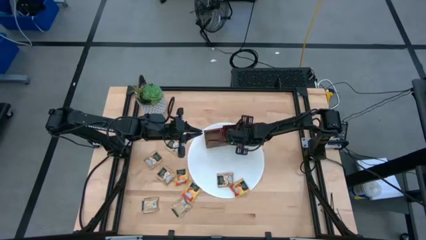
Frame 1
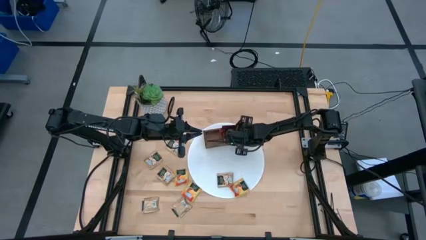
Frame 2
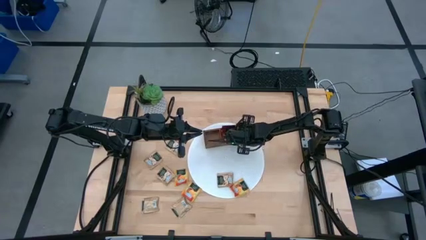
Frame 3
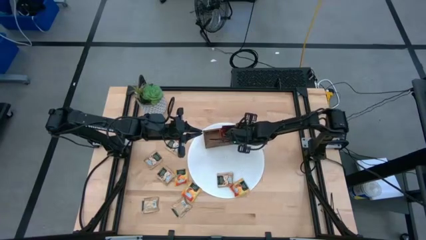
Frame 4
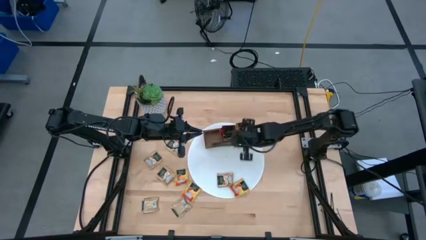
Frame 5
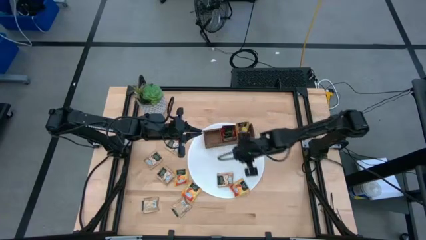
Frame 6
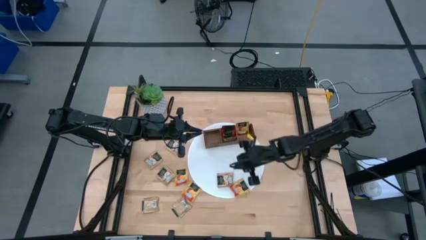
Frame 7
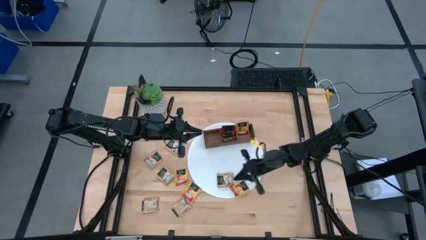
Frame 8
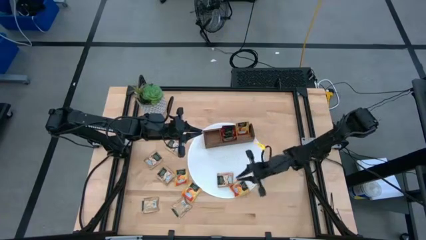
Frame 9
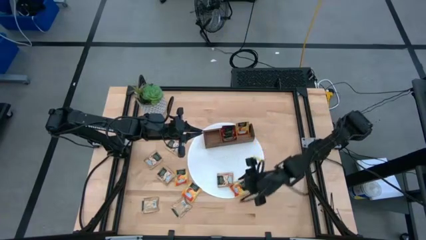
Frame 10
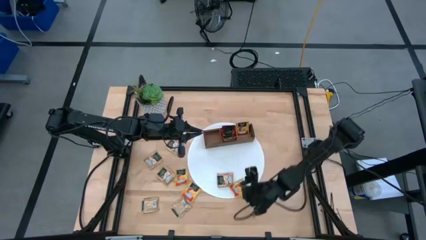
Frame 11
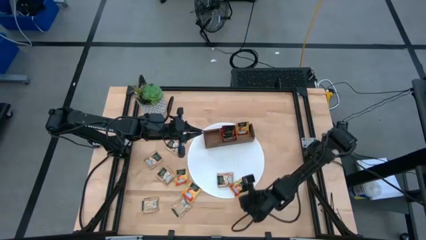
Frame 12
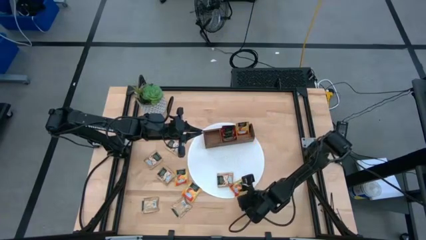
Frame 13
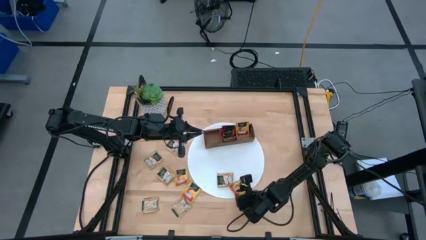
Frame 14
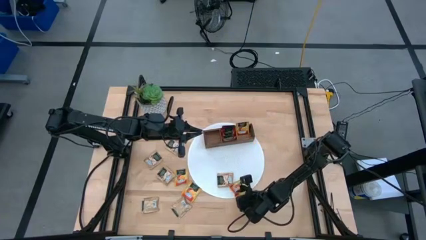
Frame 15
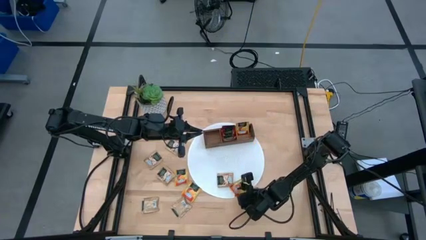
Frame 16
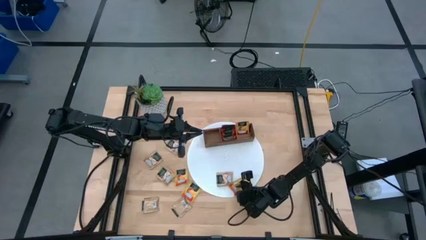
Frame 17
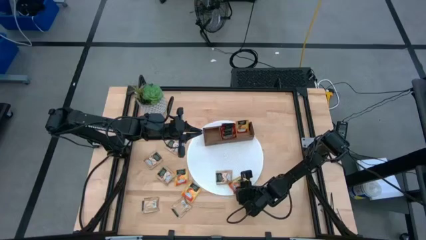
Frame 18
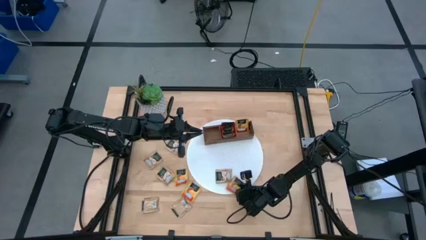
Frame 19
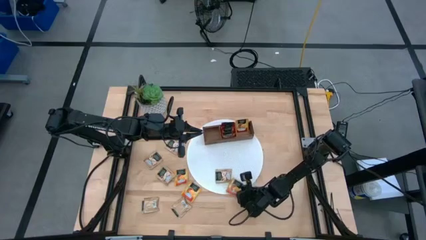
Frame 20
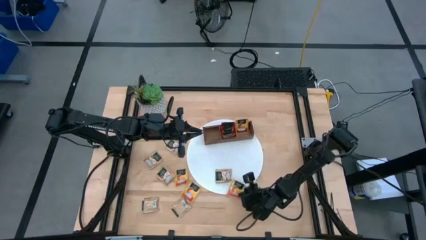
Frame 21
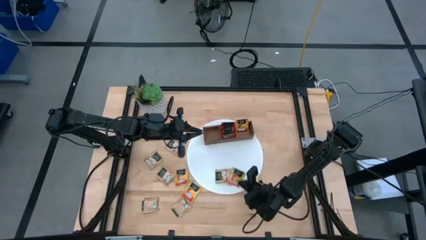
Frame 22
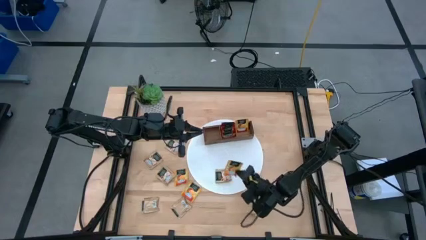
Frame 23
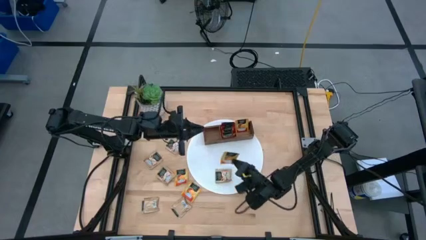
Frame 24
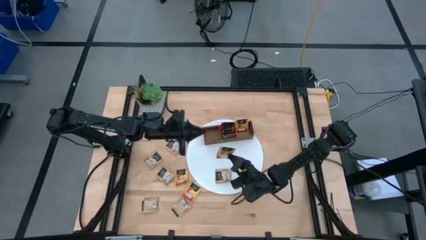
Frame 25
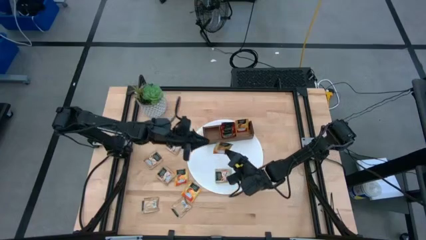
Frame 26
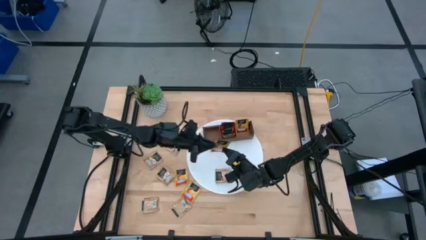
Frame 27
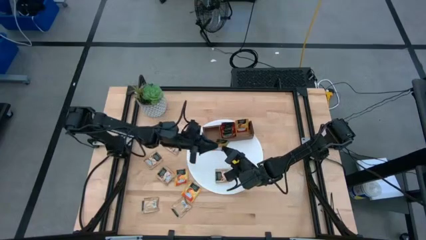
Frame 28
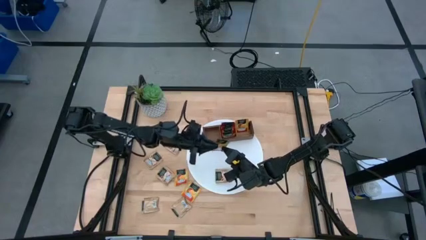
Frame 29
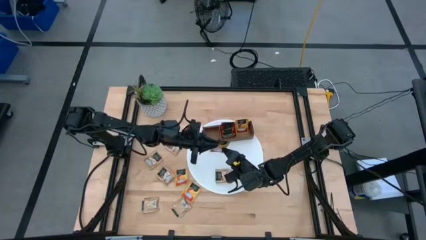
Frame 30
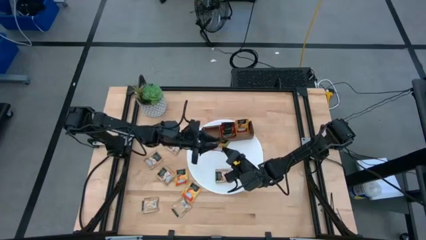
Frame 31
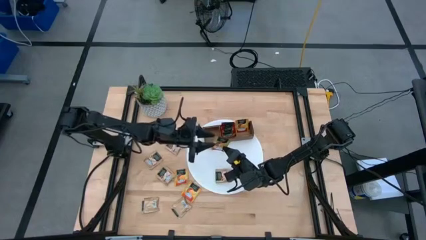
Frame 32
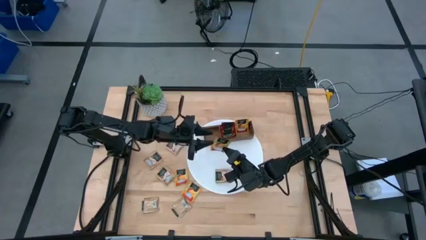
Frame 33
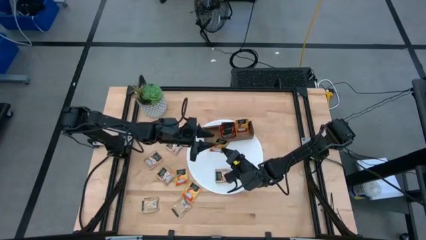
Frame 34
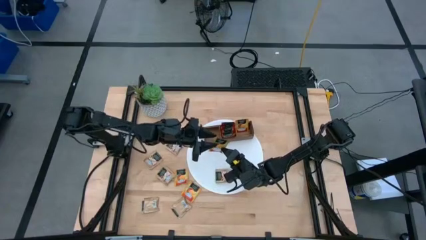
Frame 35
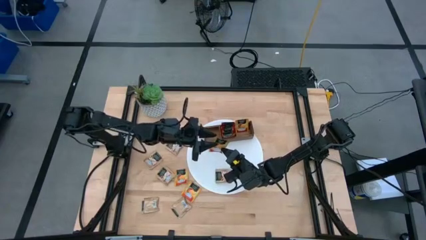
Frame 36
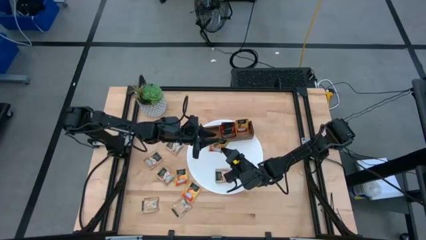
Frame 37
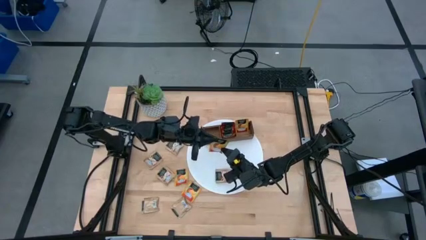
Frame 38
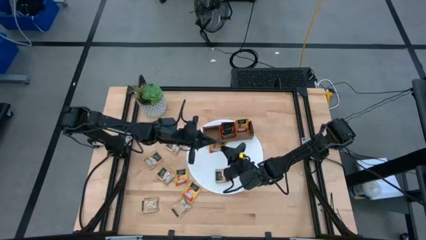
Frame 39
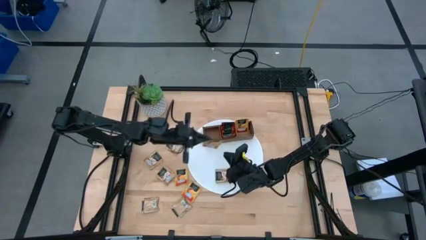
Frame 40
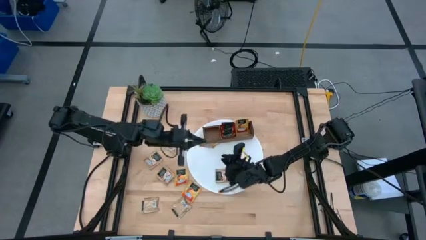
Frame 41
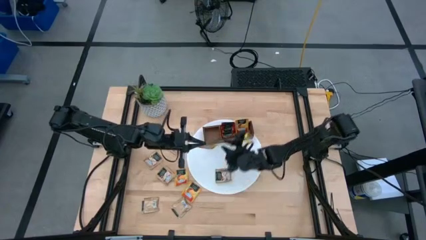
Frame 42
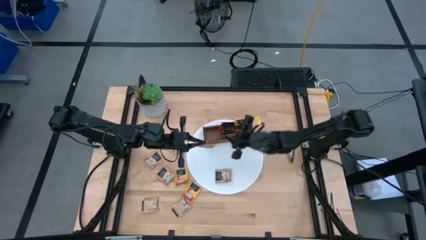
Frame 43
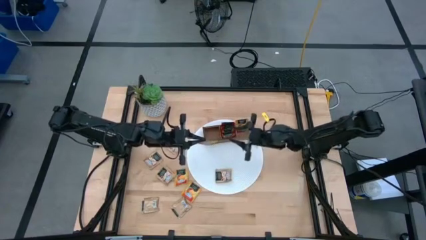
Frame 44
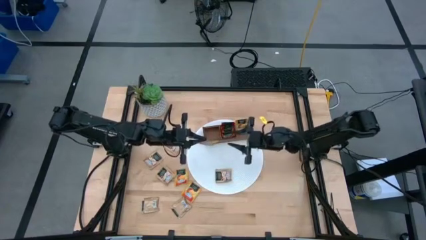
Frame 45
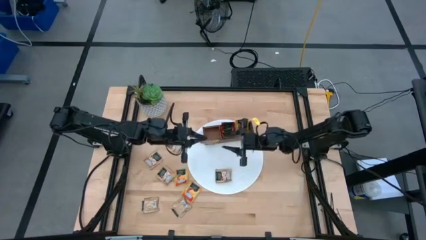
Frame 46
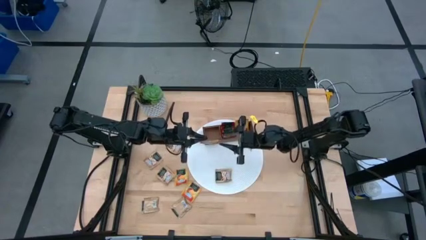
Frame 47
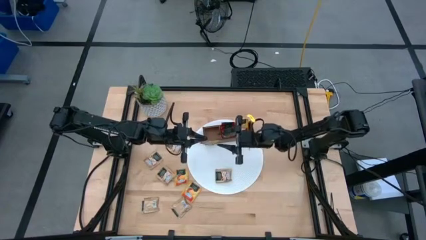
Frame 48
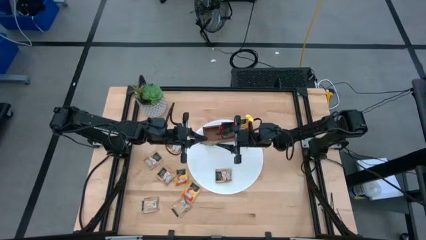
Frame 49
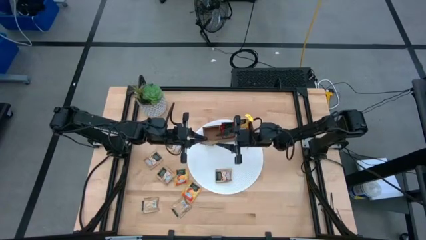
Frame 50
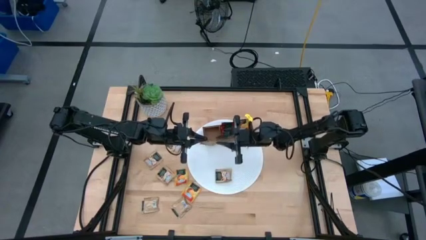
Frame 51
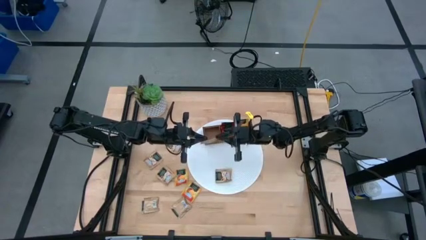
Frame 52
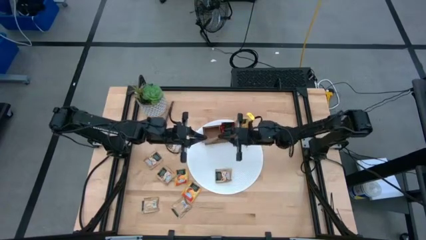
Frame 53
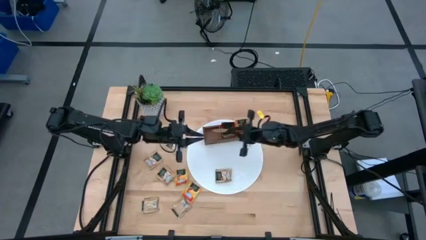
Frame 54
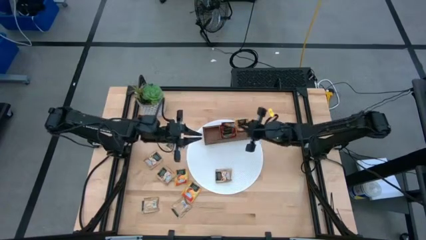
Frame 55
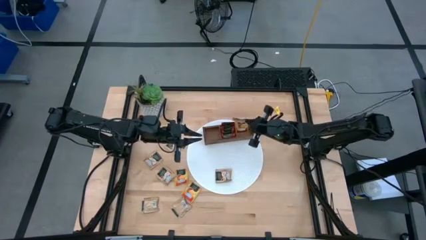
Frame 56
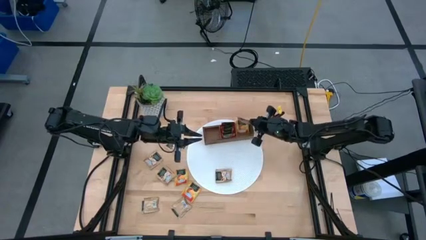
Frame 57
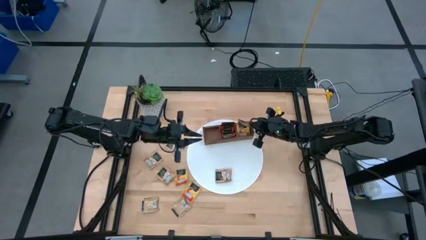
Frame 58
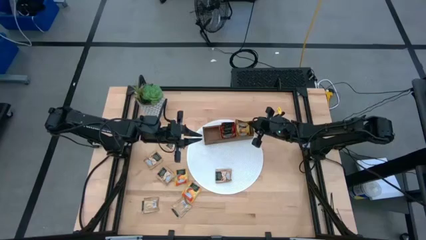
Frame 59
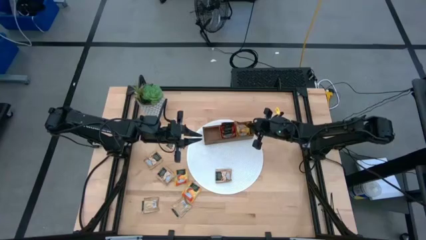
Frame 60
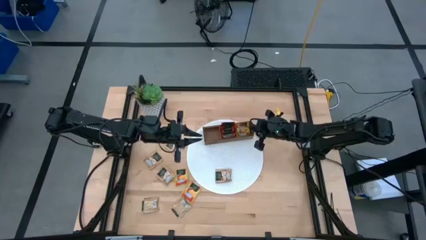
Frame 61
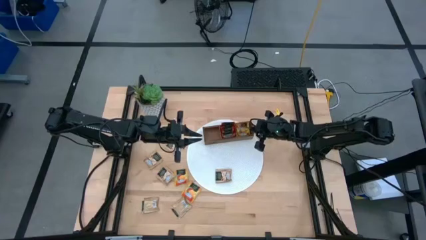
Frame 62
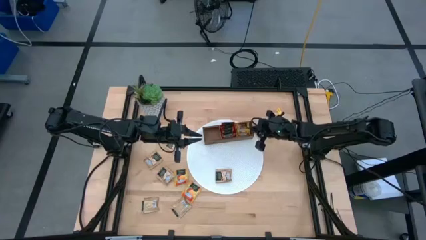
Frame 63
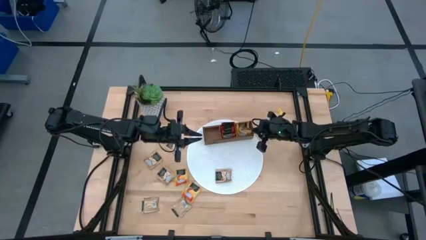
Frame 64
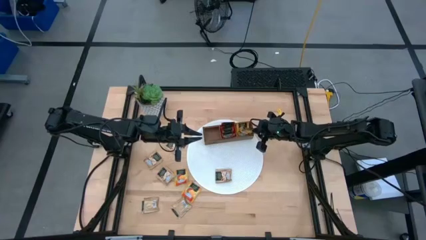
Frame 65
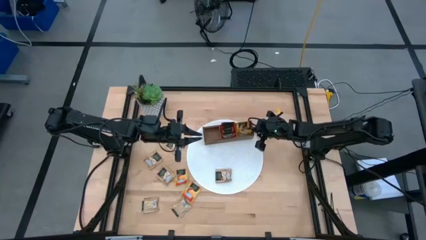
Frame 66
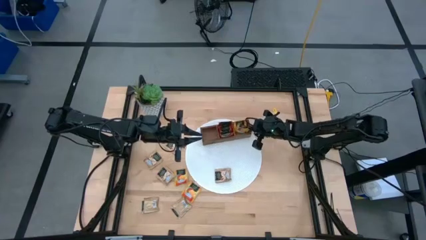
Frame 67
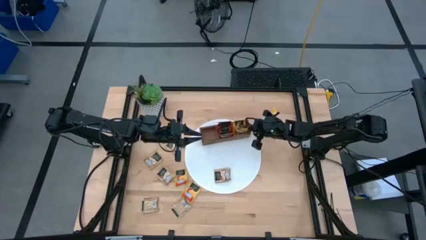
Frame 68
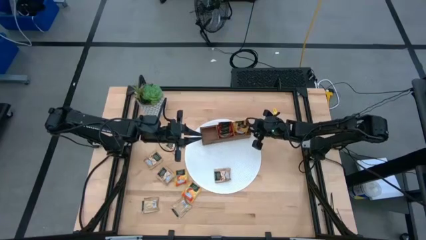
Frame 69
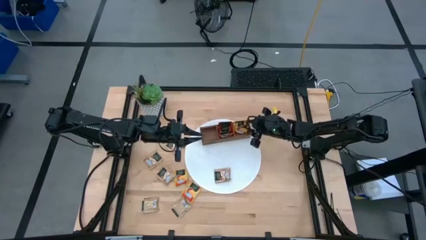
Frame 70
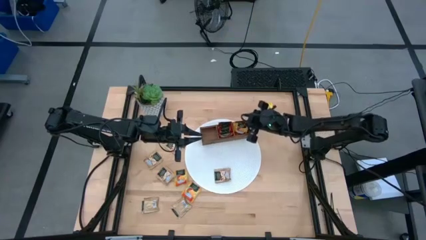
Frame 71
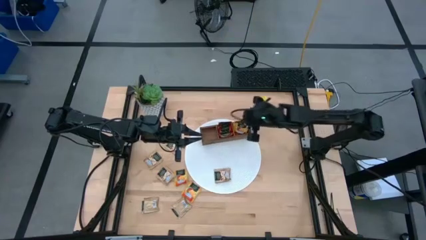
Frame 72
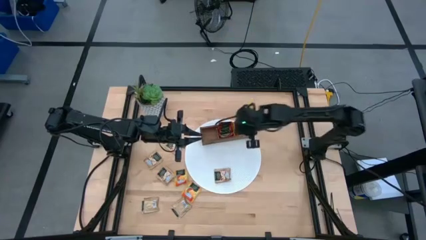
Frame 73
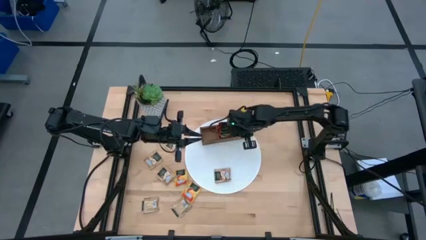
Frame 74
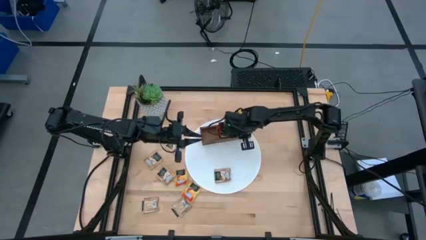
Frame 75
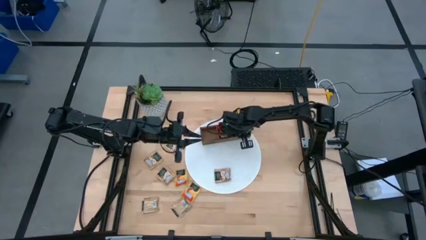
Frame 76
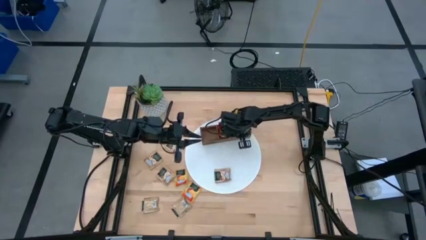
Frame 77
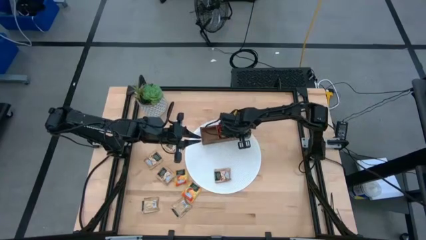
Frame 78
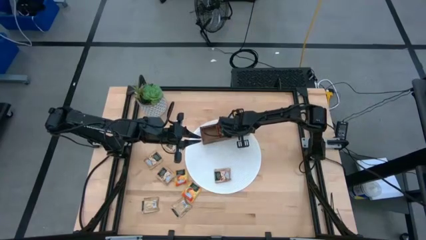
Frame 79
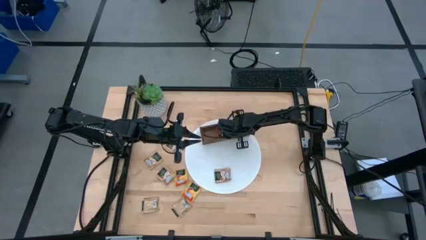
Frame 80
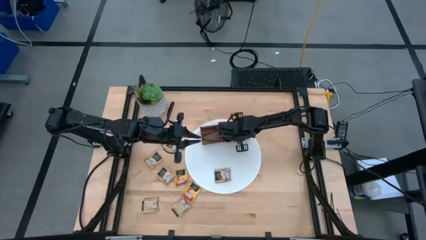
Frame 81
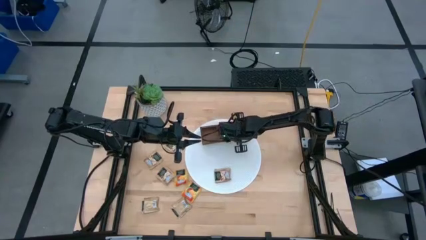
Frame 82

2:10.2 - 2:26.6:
Task: Pick & Place Tea
Put the yellow tea bag into the right section of the wooden organizer
